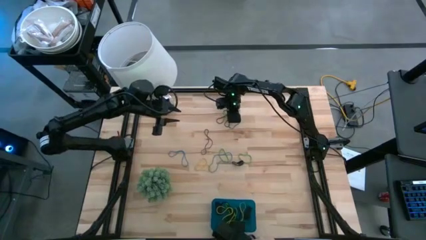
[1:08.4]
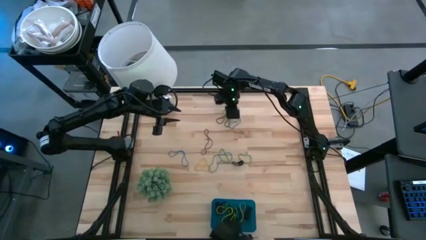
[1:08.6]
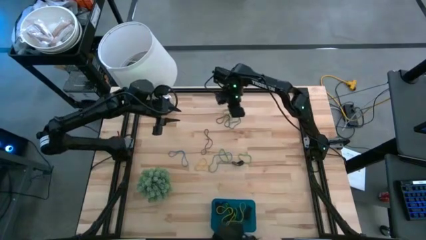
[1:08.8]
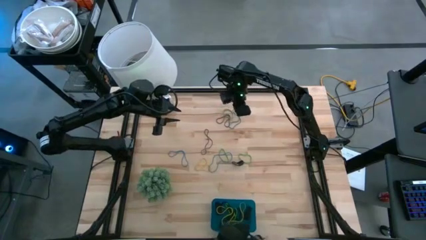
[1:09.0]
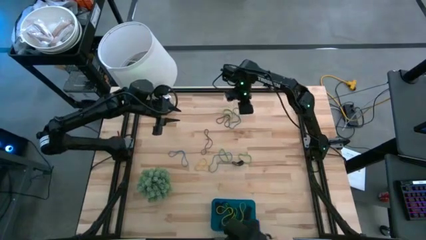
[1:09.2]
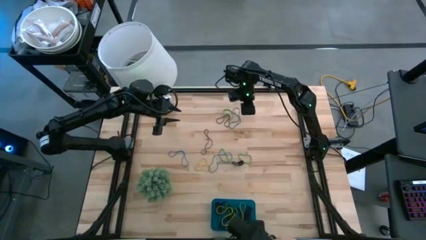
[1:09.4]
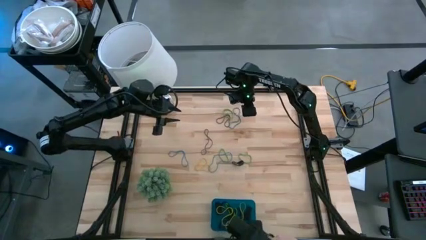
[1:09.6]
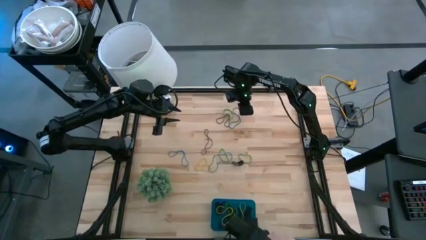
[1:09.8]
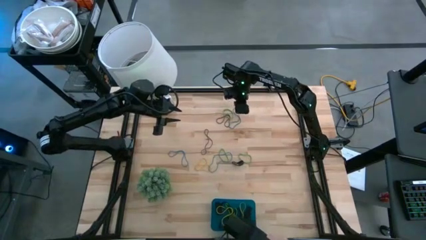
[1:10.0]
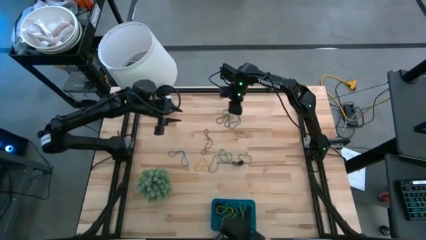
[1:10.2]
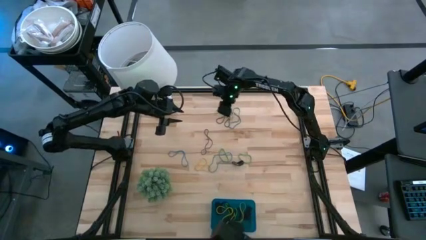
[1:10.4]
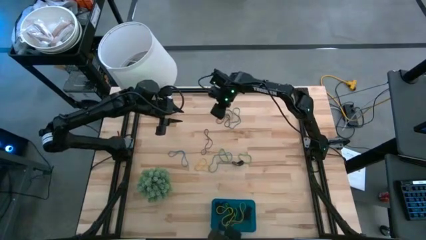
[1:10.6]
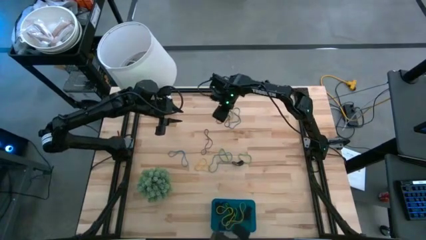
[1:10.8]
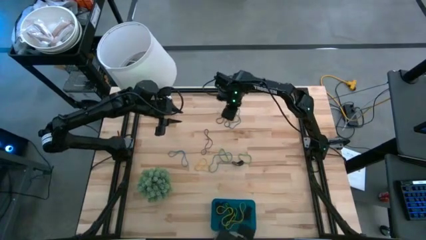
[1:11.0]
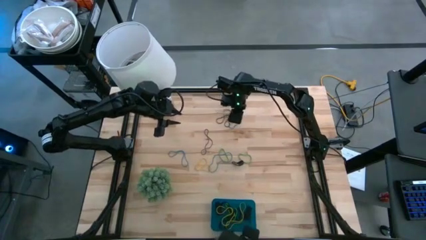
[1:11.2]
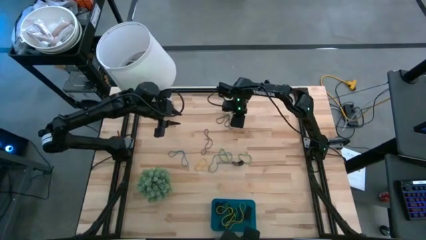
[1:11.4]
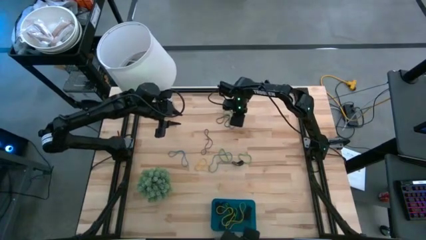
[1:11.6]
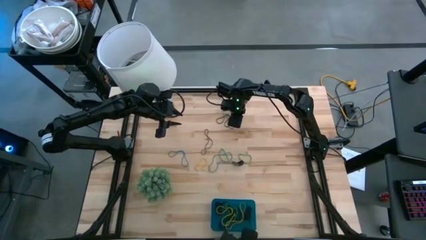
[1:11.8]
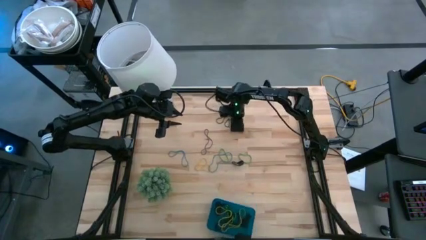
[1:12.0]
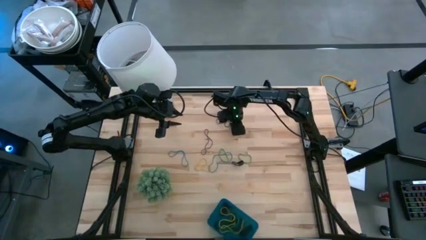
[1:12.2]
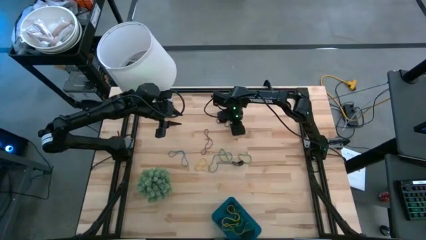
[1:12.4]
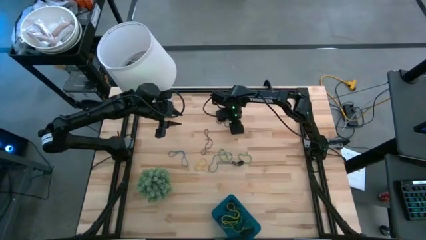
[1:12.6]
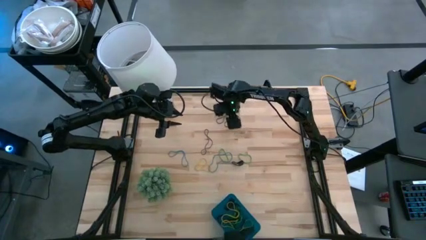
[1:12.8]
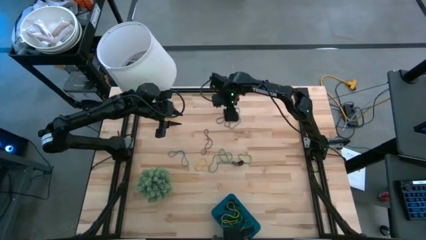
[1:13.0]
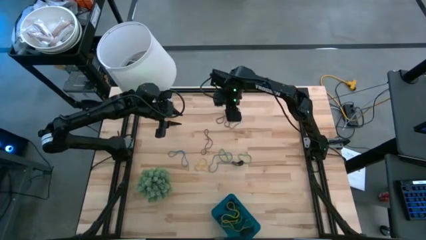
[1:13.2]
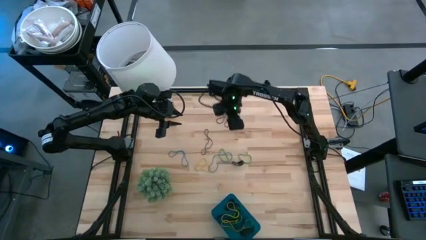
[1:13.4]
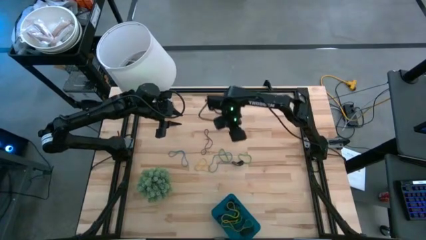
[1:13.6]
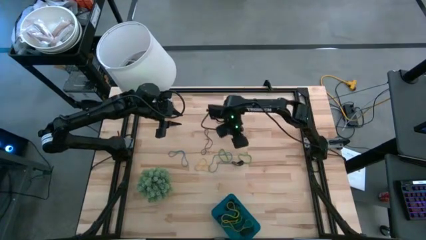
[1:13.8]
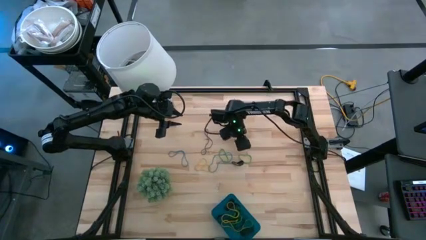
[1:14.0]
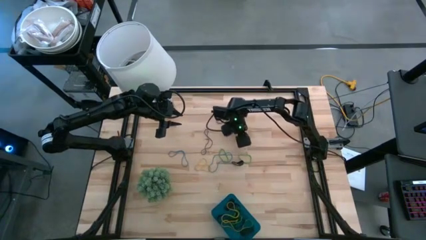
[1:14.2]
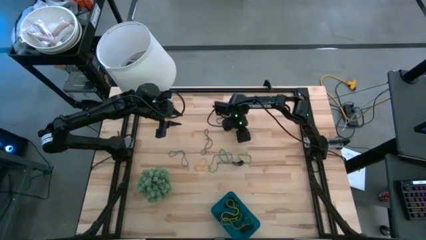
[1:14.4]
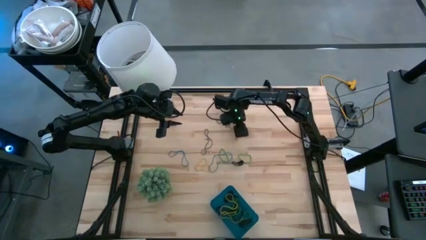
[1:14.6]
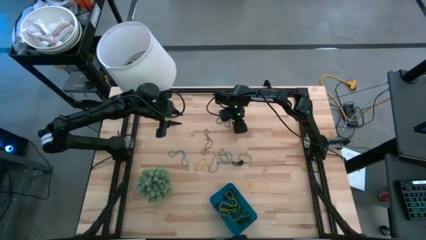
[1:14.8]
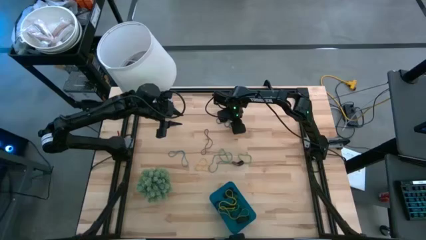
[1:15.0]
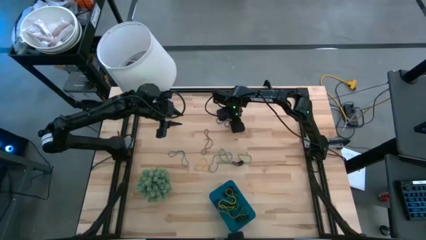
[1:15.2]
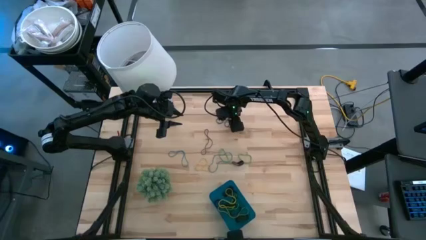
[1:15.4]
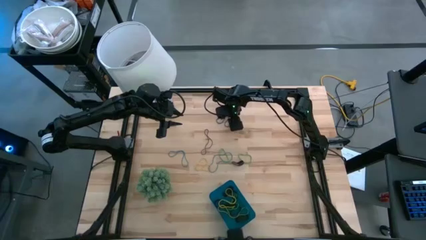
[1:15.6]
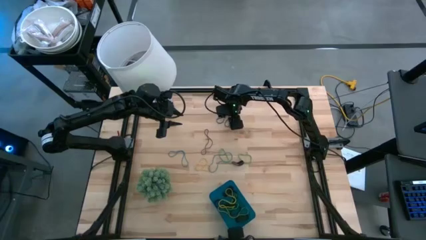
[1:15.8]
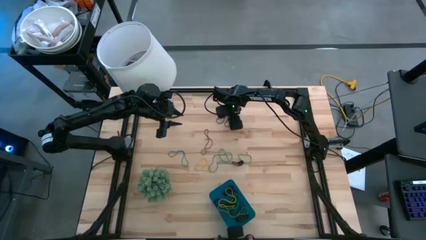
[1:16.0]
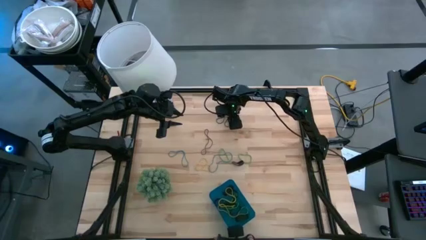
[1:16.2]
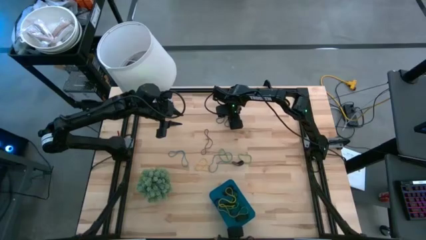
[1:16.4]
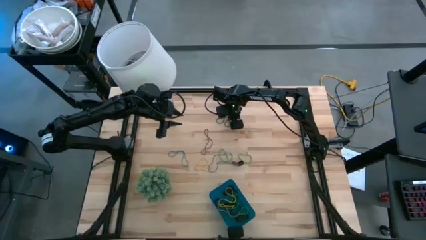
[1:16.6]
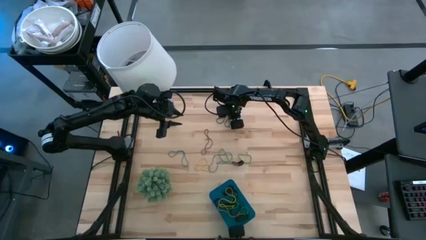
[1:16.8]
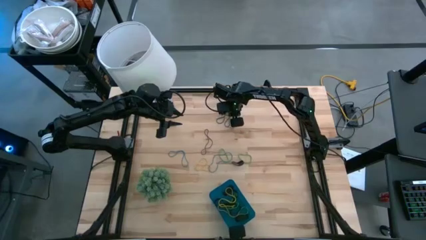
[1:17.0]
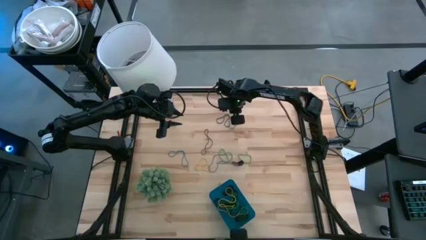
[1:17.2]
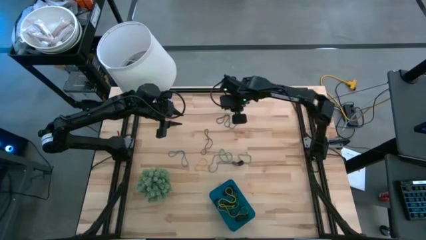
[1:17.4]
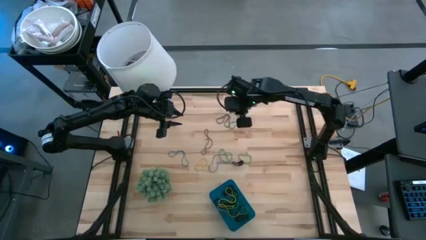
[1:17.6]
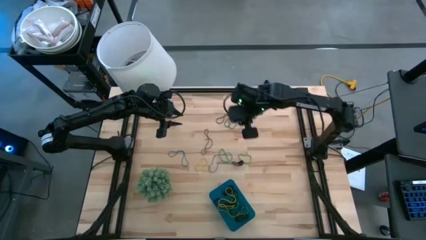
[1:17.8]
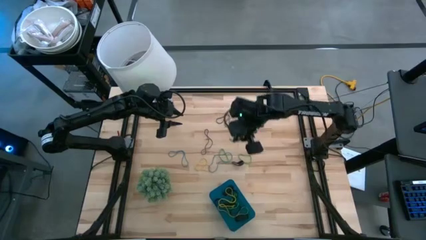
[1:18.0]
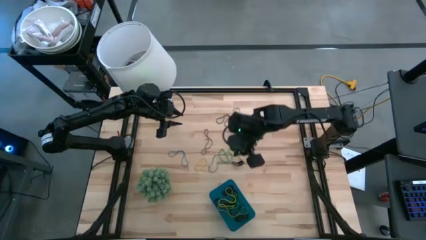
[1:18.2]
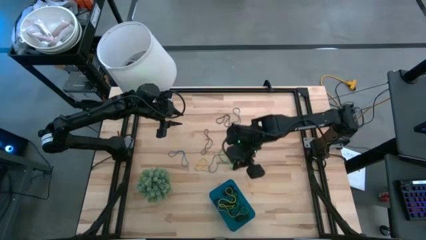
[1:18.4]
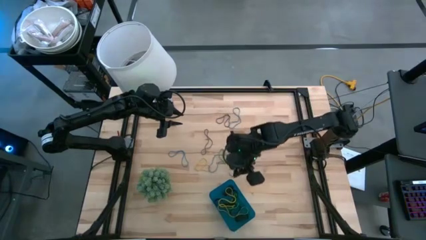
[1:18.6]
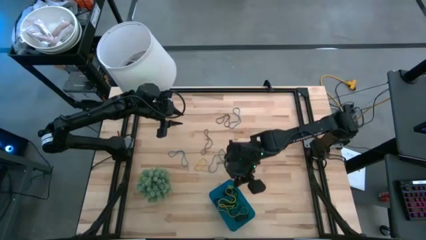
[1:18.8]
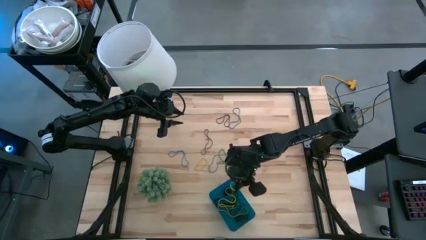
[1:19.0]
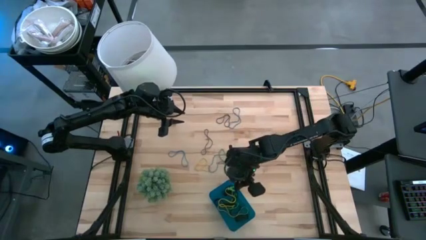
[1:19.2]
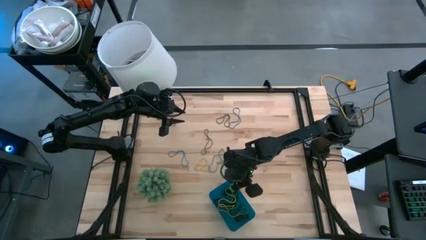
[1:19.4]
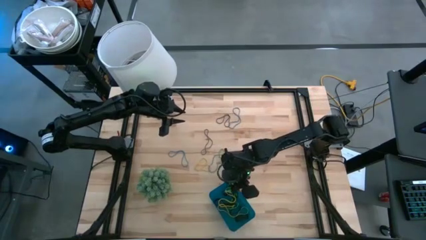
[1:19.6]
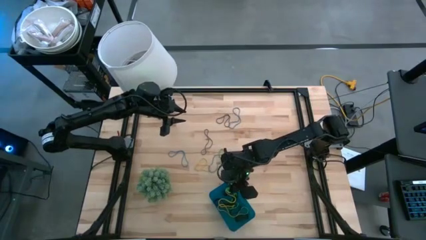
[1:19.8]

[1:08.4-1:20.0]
Task: Pick and place rubber bands into bin
Put the green rubber band into the blue bin

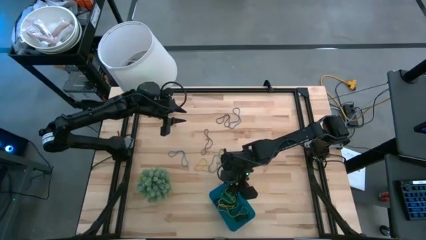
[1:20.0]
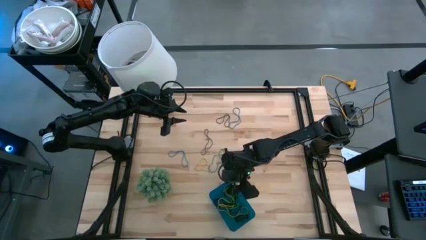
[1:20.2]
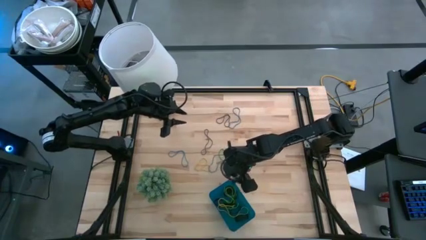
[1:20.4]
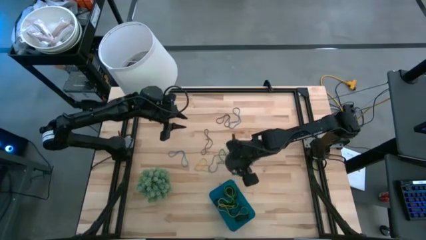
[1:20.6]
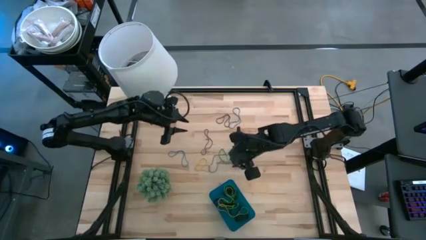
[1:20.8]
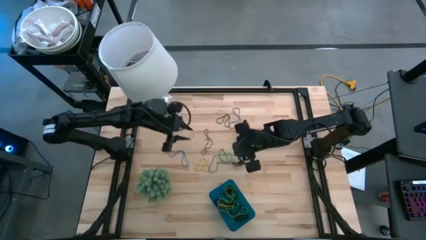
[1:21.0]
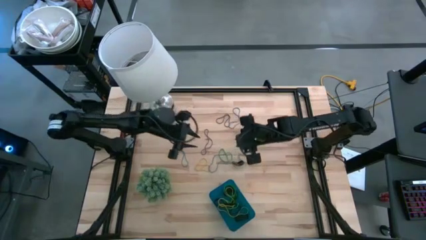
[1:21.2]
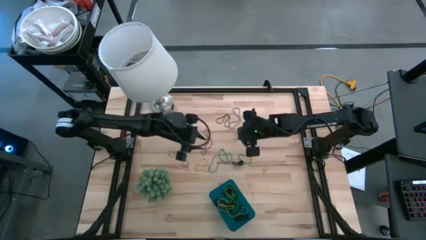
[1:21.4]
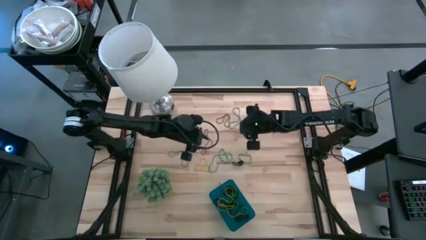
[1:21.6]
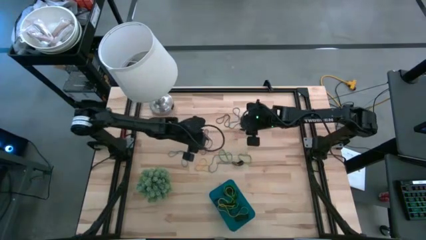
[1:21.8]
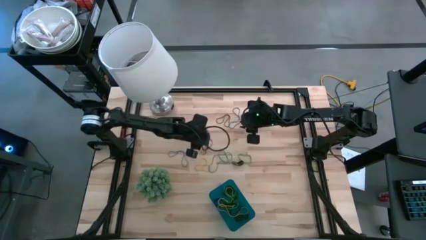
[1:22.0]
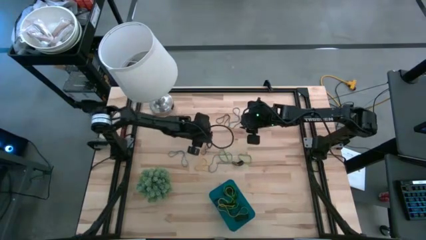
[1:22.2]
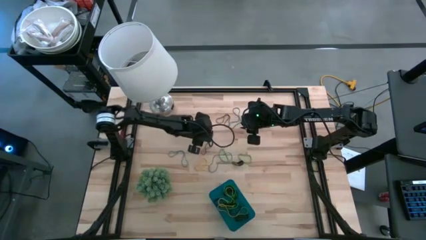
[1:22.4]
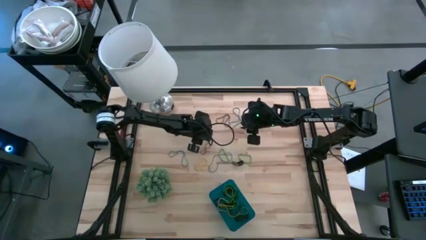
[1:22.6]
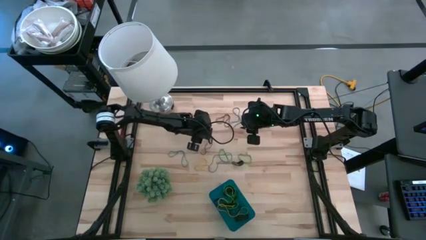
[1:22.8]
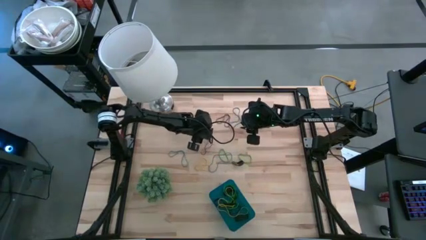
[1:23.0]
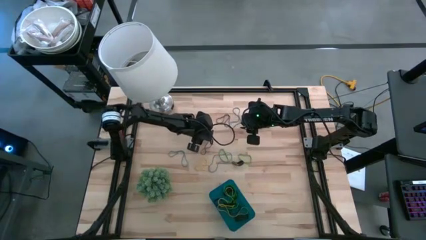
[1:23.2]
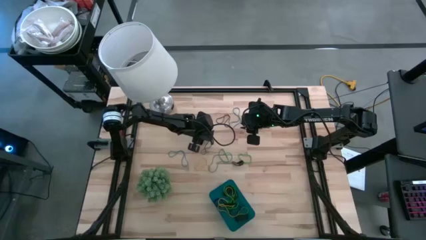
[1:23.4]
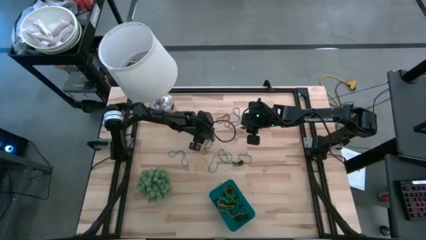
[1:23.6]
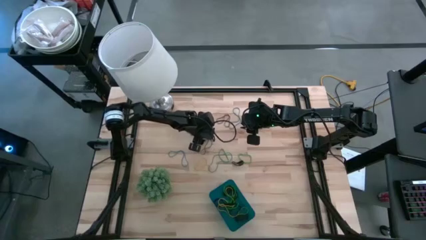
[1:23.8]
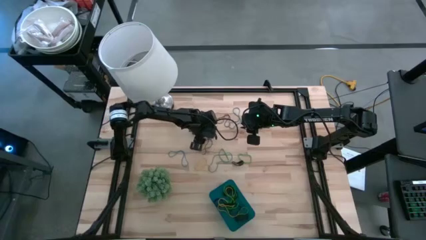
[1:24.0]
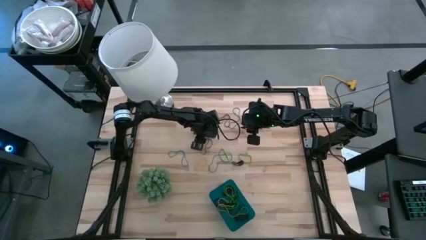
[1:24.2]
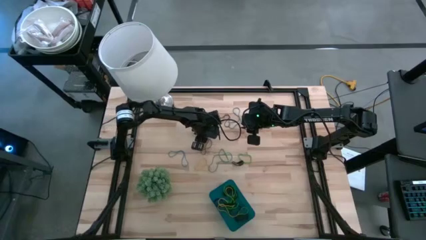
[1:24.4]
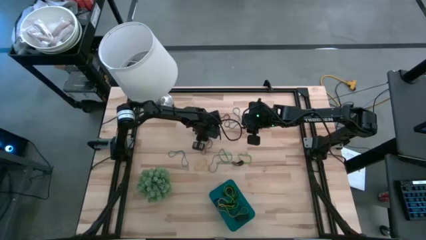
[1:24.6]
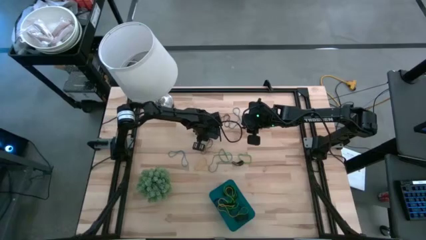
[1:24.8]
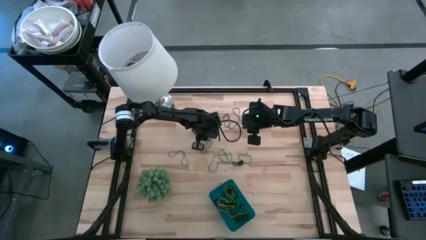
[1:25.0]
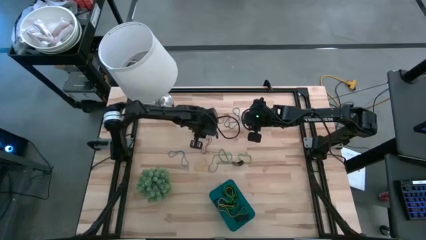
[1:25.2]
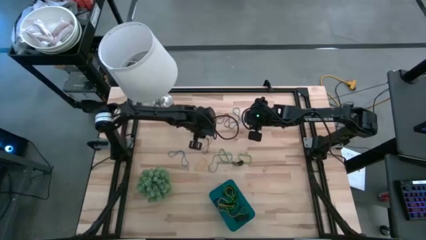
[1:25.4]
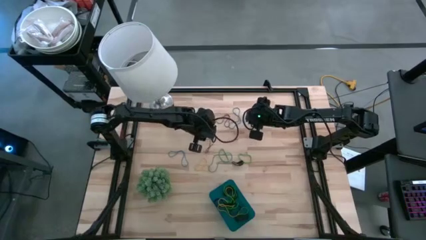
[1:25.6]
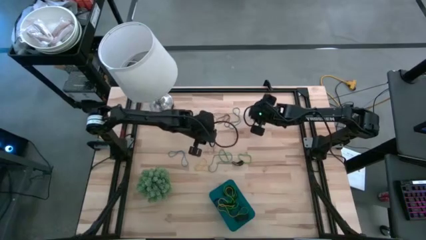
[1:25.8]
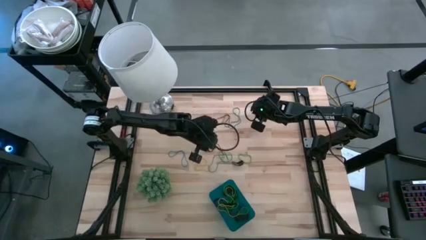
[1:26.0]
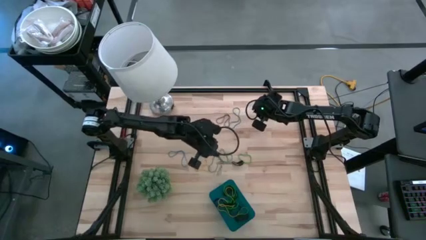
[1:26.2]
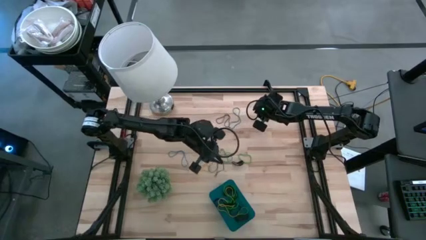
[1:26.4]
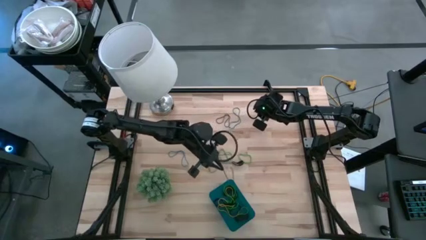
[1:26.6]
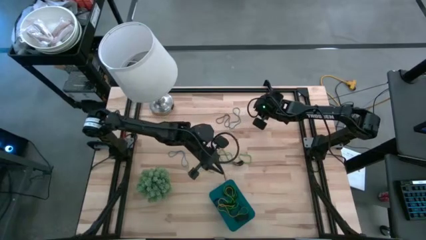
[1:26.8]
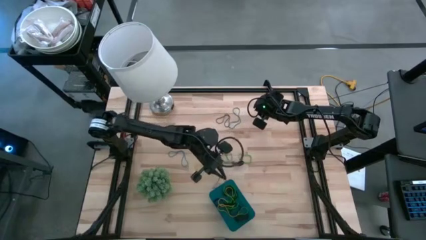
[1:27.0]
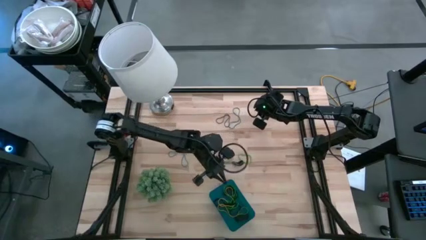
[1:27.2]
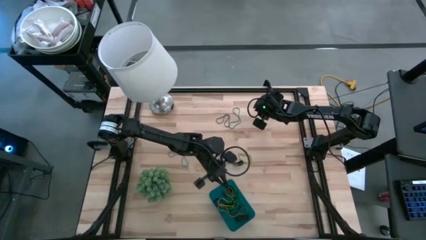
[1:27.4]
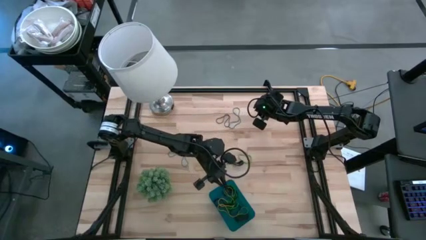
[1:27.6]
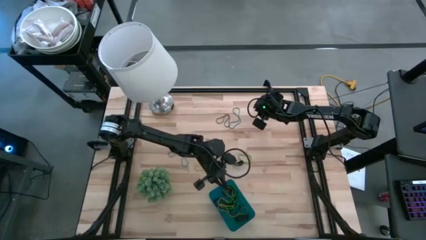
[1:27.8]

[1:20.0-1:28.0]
Put the purple rubber band into the blue bin
